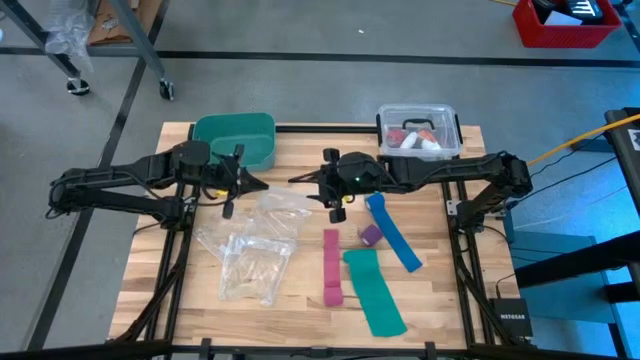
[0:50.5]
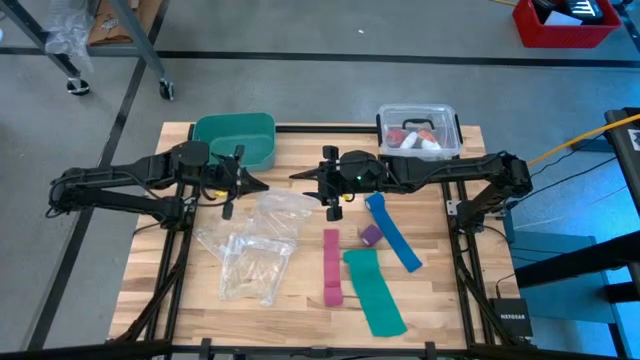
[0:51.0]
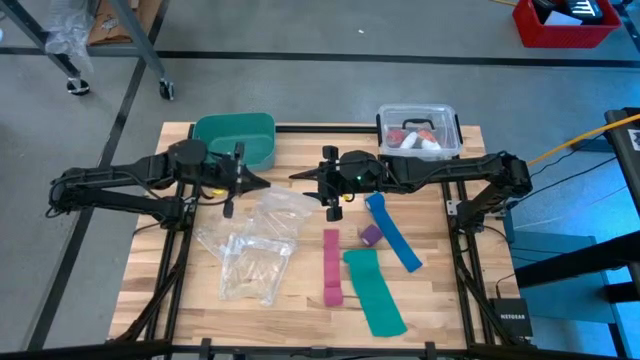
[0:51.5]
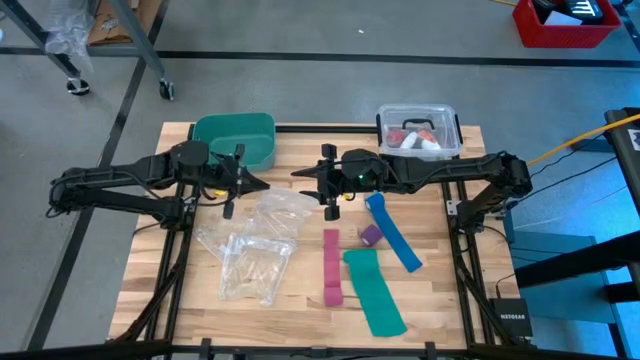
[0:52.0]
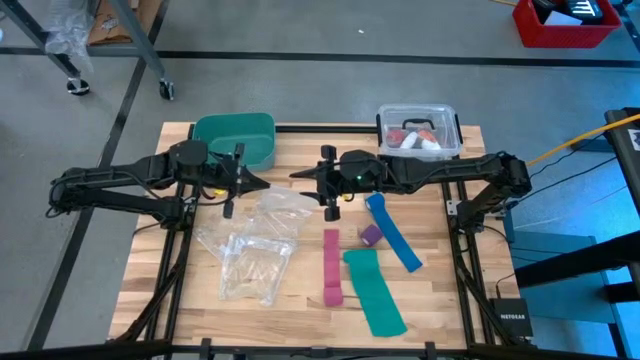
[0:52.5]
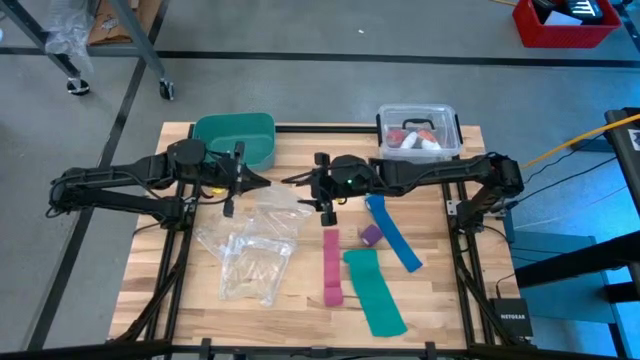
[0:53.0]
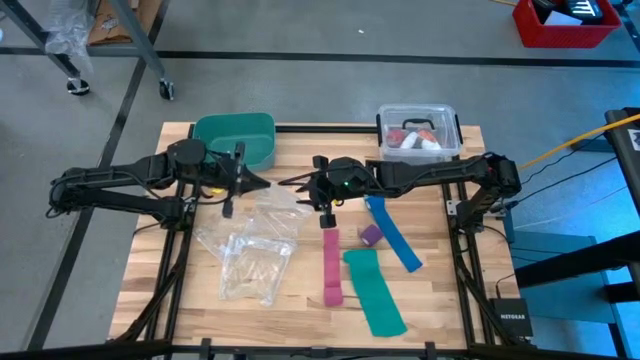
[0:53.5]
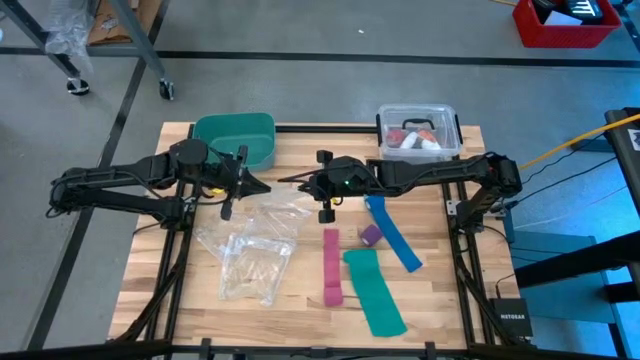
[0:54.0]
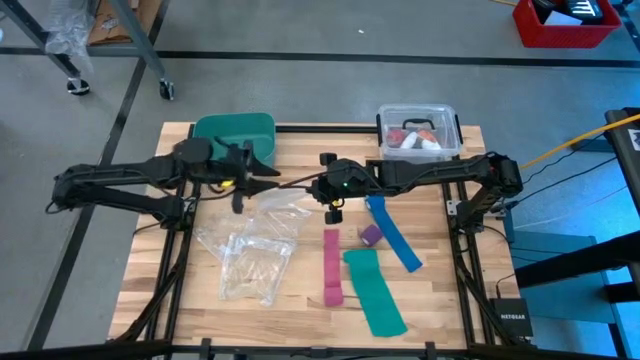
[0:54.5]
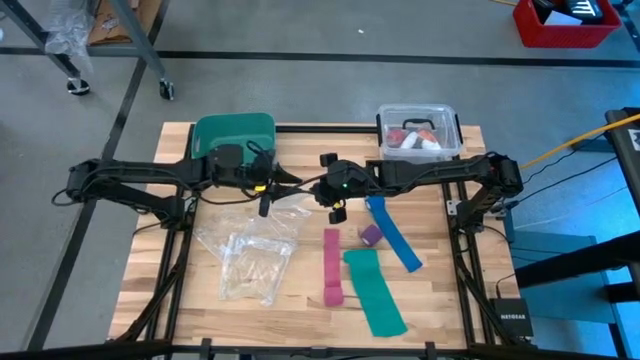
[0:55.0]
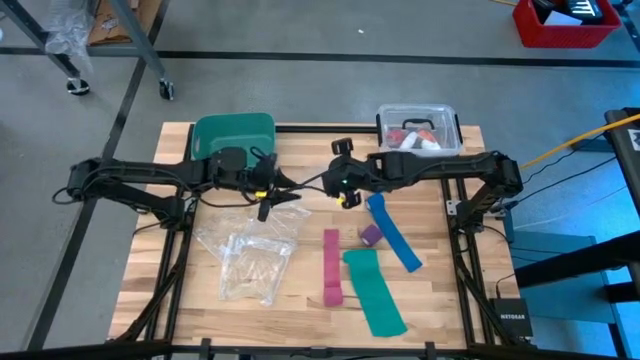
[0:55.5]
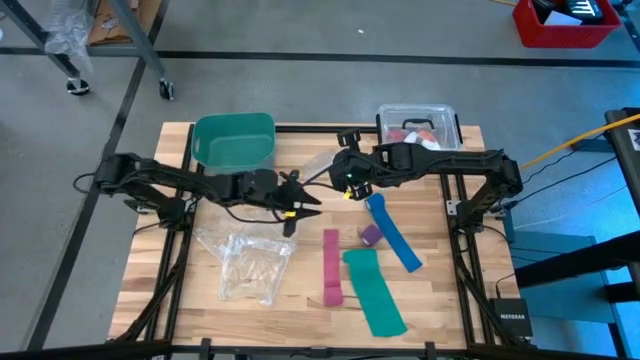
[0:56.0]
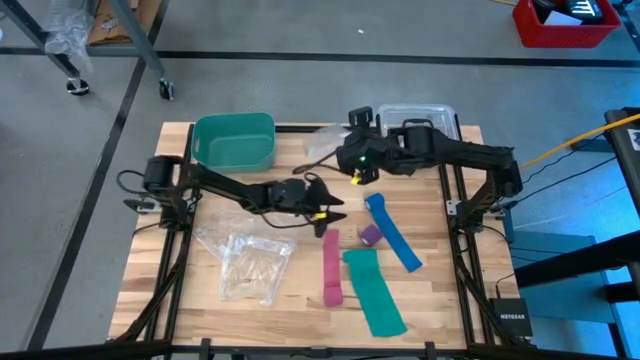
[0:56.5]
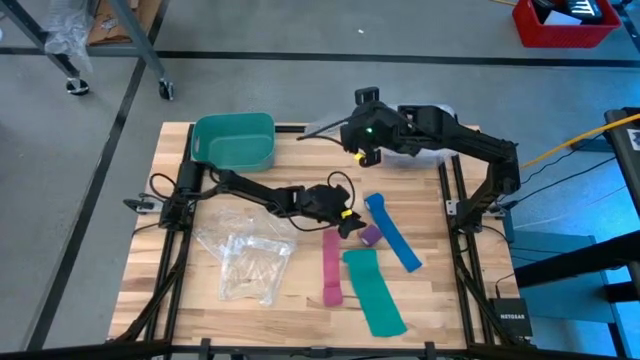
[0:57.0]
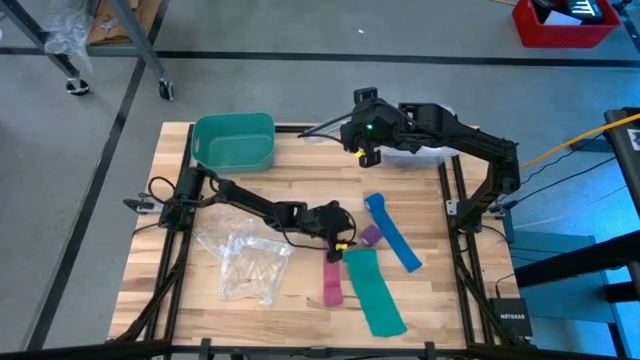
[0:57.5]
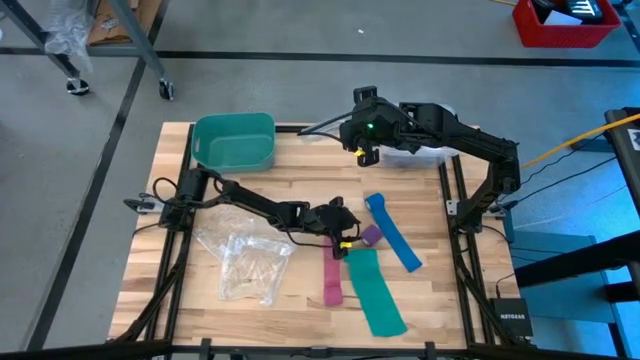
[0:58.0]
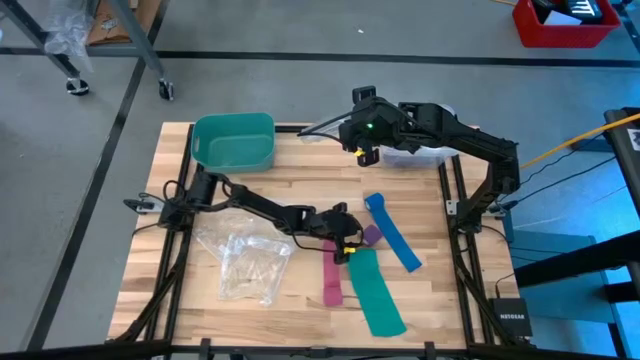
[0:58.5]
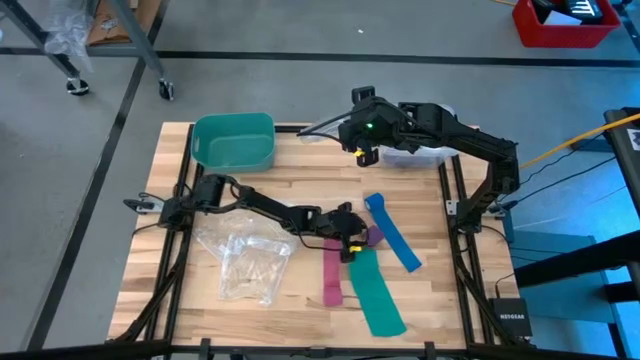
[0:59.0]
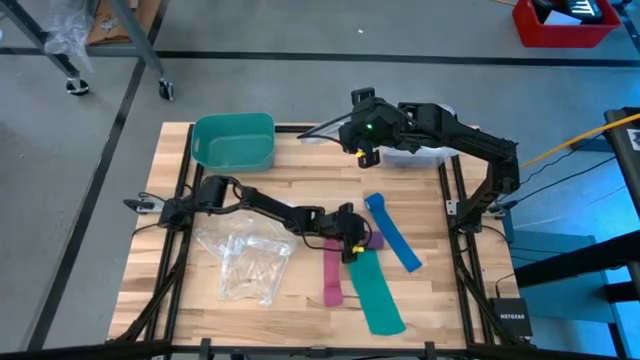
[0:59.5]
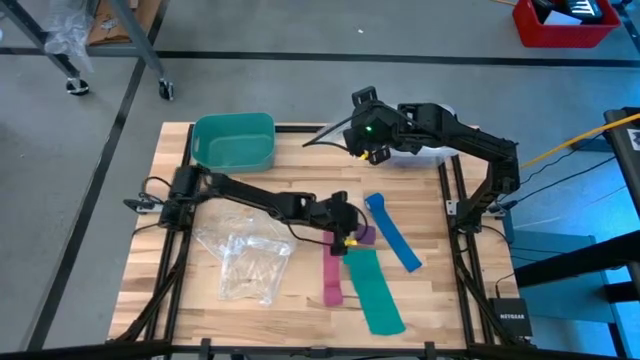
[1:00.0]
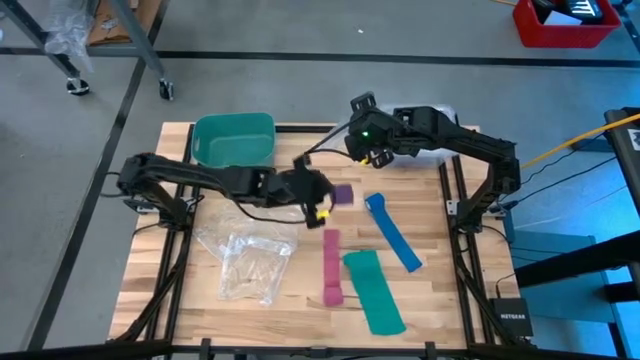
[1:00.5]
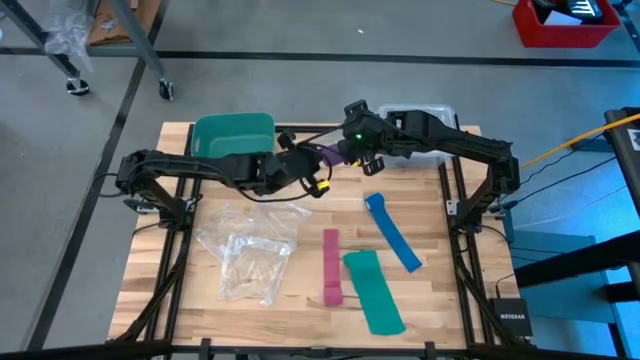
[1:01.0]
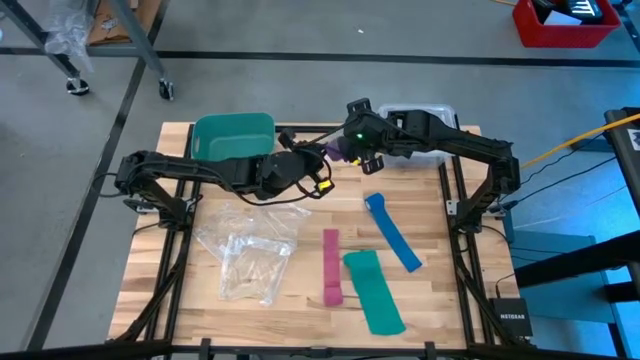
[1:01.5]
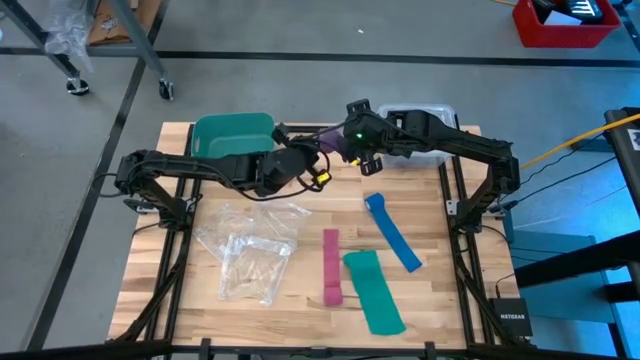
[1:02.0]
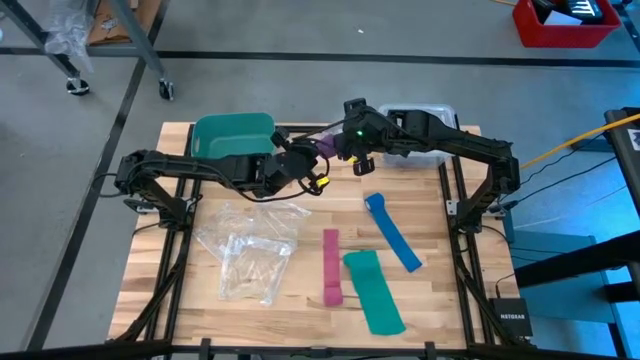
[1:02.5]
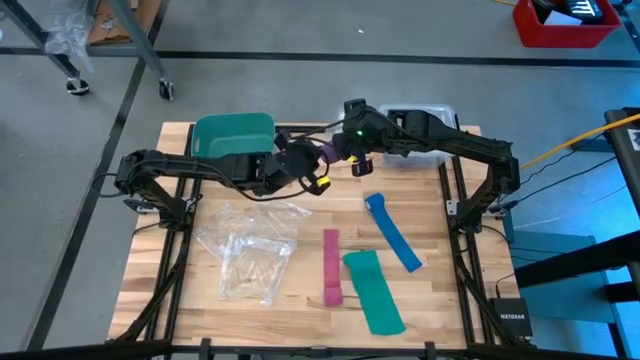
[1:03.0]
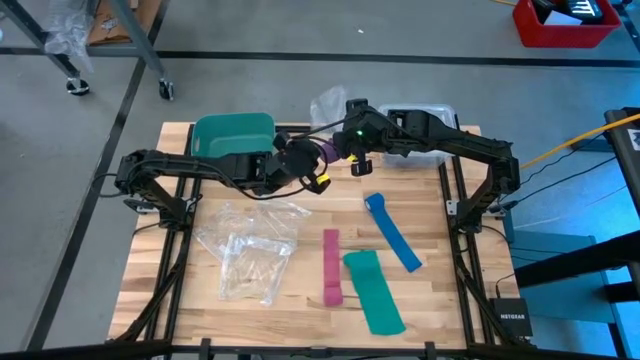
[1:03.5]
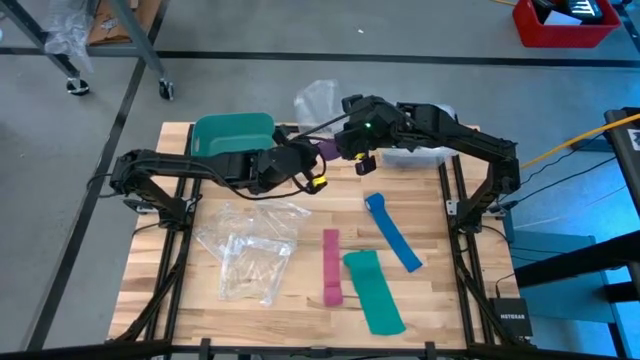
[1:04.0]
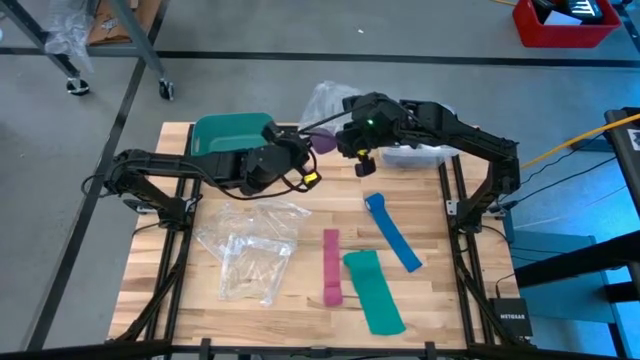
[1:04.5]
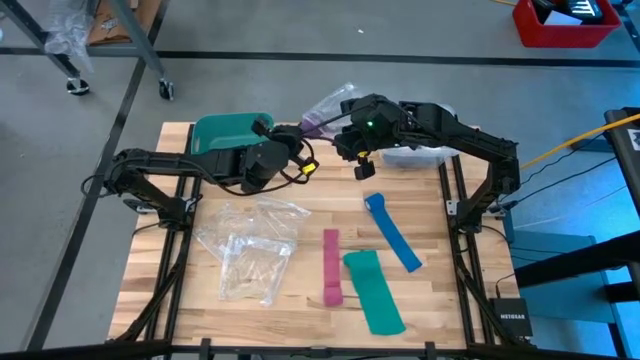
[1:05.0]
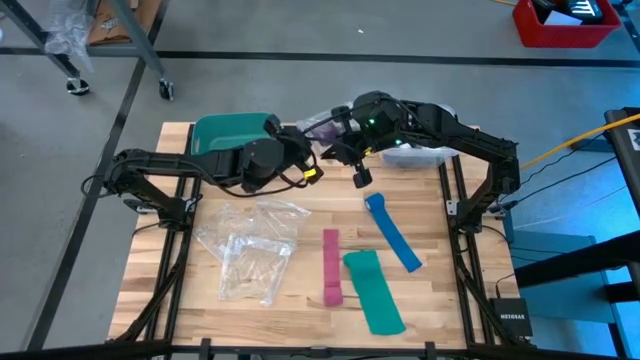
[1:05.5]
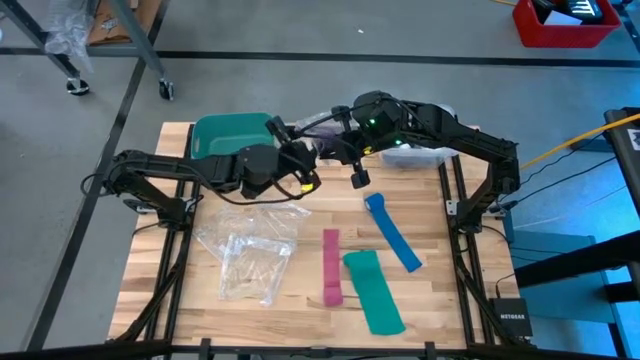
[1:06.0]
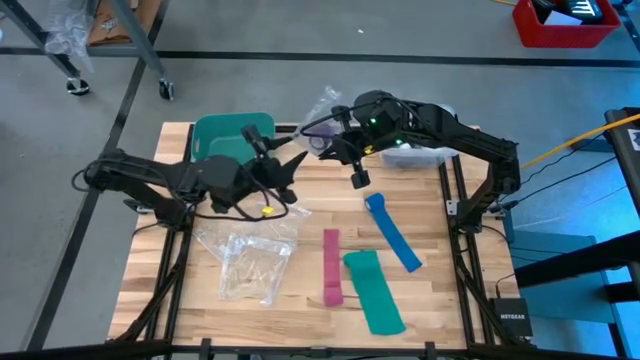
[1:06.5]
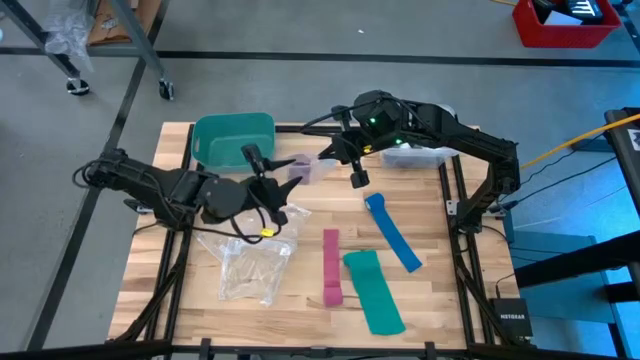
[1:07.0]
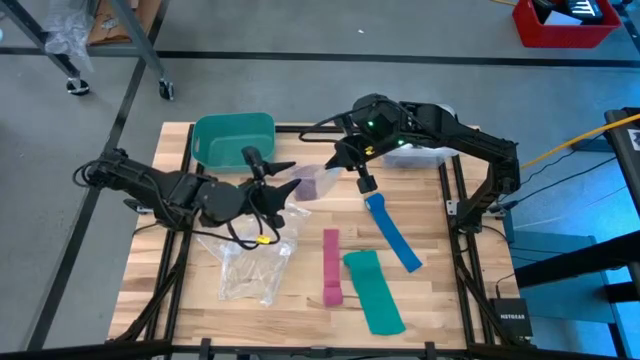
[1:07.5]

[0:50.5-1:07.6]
Task: Roll bandage
Put the rolled purple bandage into the transparent zip bag

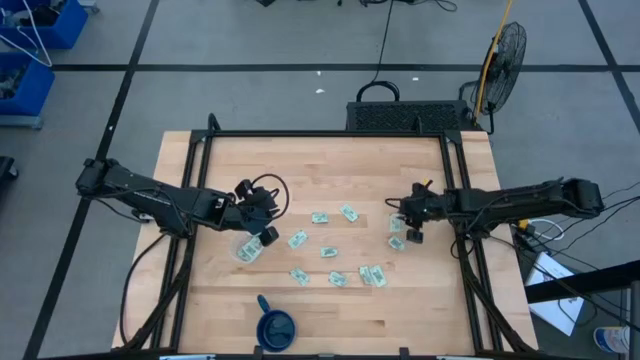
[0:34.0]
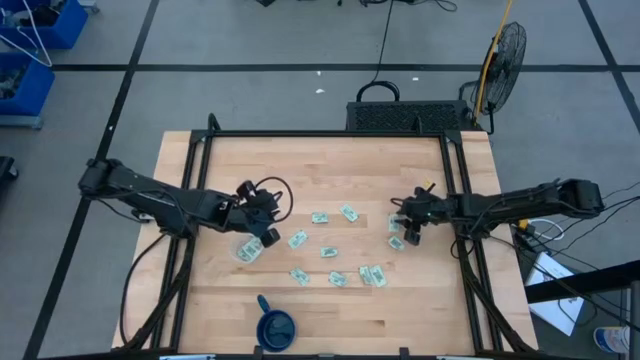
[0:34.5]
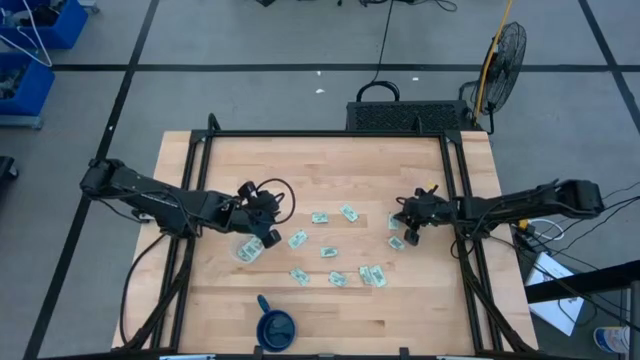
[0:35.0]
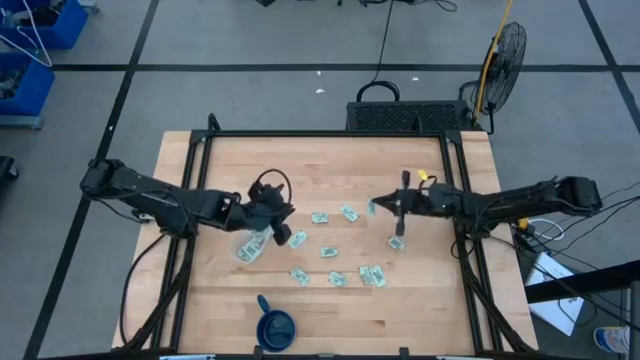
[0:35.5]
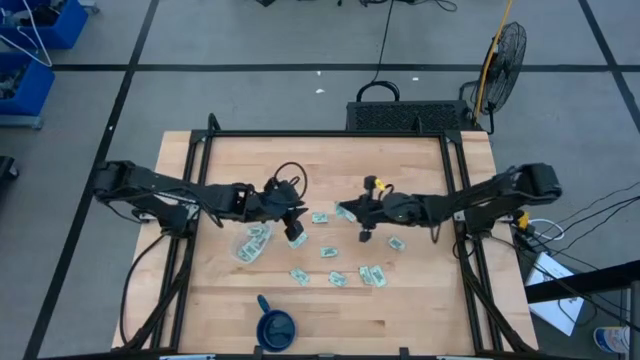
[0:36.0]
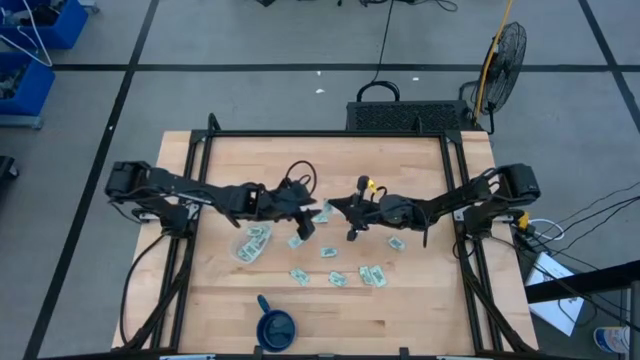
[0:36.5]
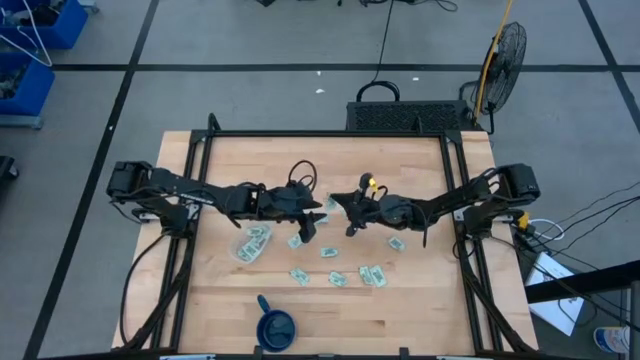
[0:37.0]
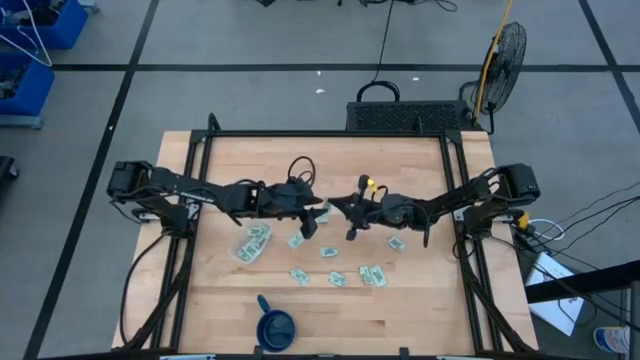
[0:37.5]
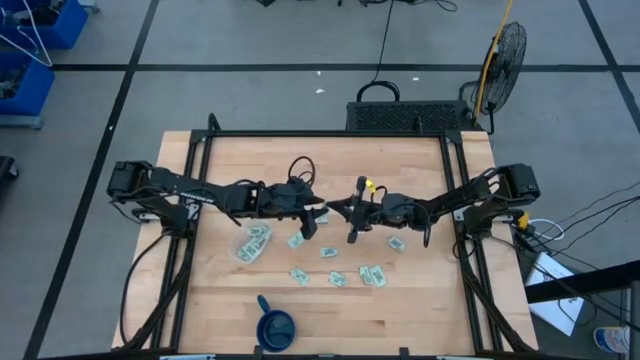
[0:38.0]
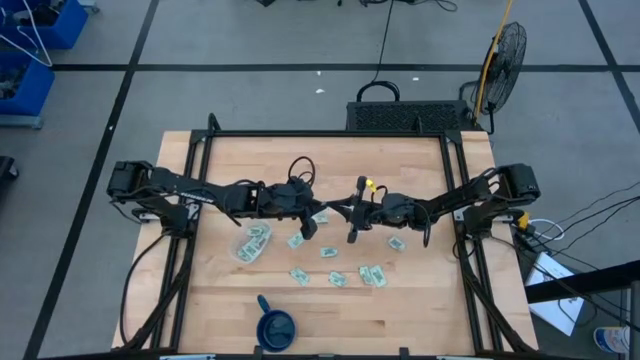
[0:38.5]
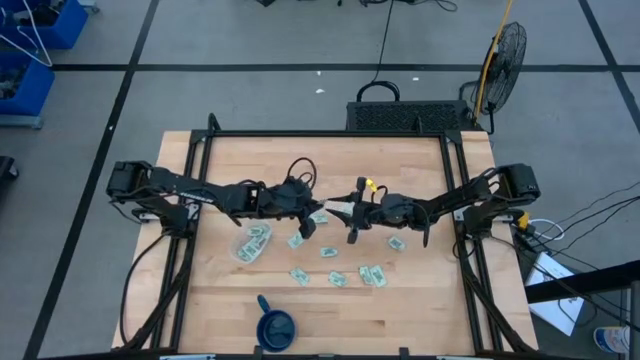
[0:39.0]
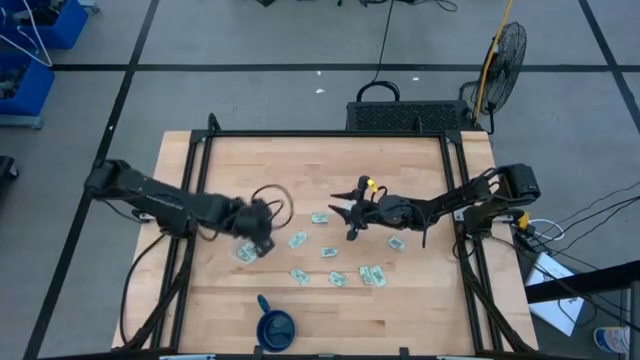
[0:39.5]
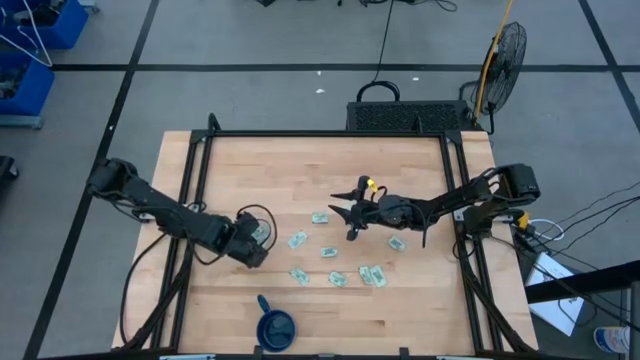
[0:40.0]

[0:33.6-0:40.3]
Task: Pick and place Stevia / Truvia into bins
Put the stevia packet into the transparent container
